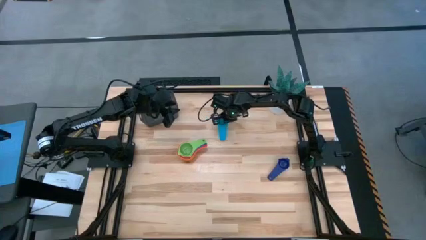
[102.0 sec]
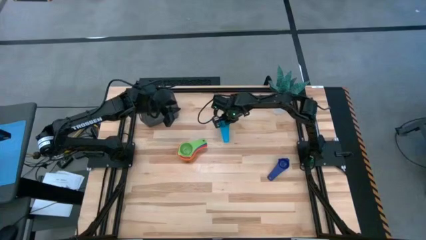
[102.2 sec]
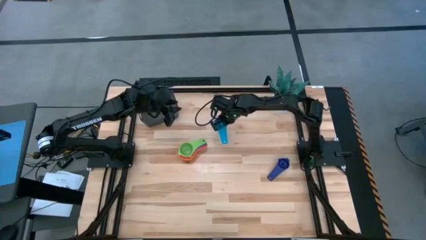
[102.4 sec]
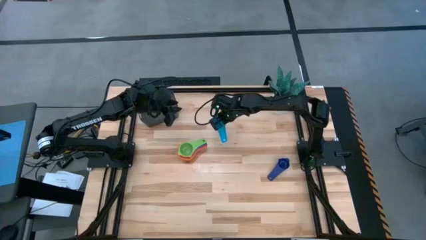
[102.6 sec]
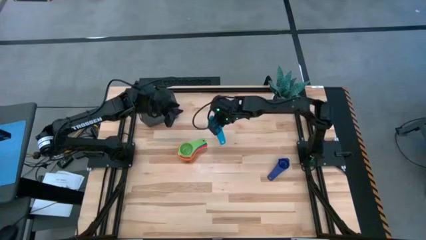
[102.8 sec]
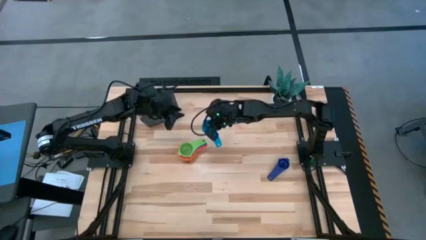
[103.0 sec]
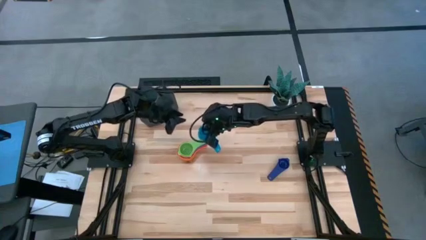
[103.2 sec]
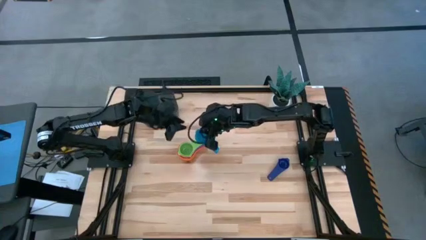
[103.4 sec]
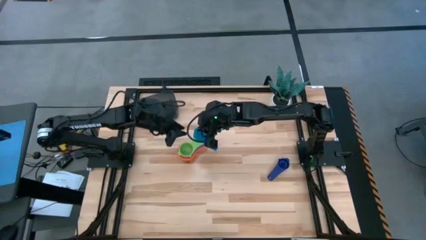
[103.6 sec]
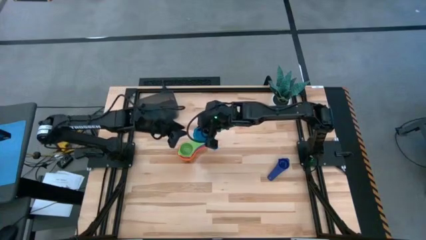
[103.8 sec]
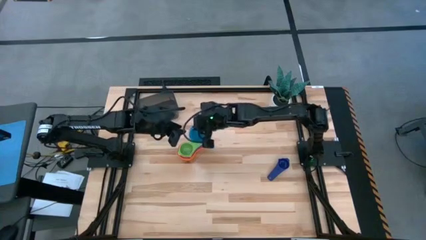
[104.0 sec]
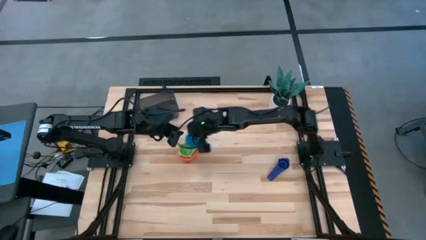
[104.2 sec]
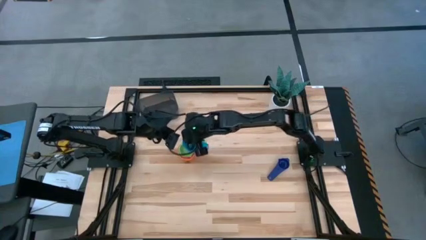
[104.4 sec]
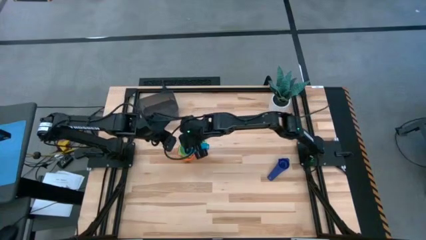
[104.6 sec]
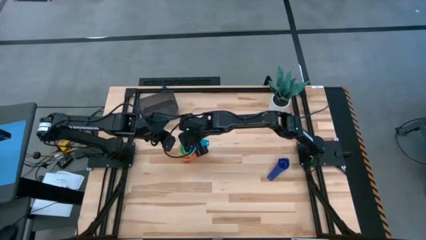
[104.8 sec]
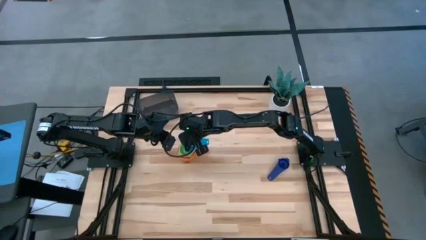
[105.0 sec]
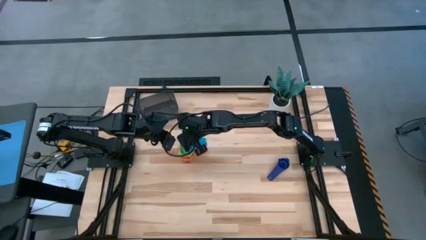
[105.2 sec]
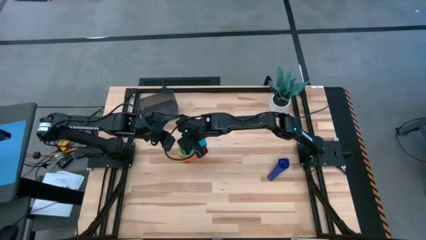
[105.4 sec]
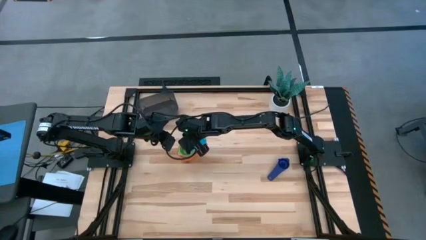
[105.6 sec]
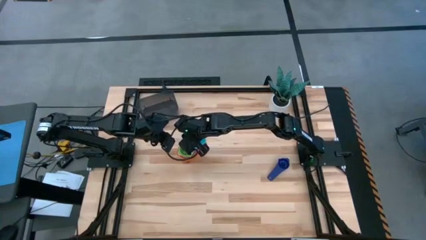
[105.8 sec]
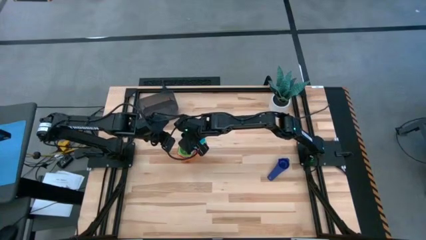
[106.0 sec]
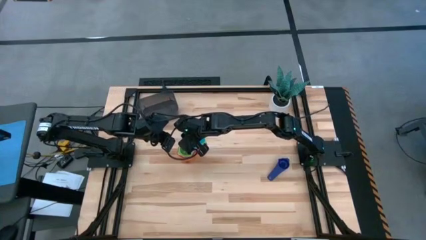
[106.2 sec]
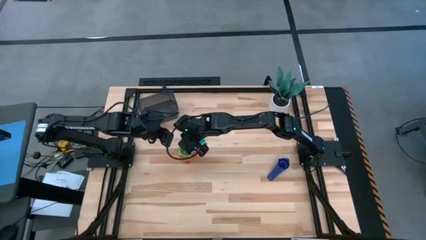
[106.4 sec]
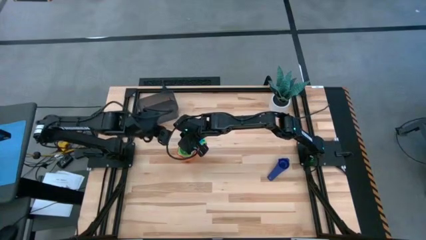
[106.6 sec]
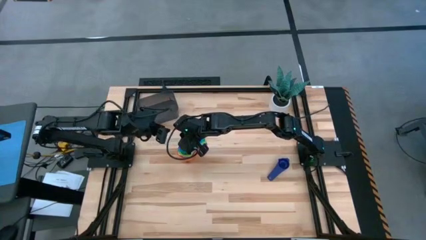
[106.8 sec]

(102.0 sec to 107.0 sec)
Task: Nest measuring cups in basket
Stack the light blue measuring cup on top of the green measuring cup
